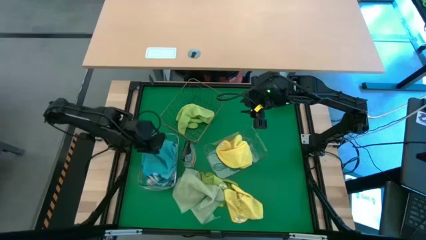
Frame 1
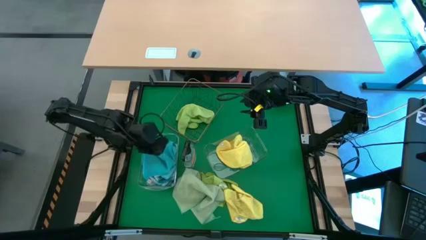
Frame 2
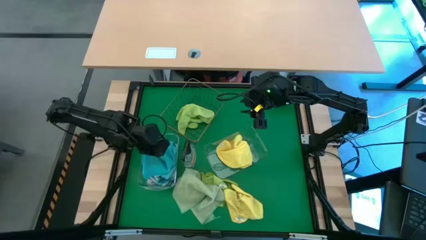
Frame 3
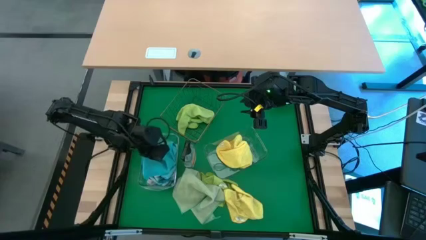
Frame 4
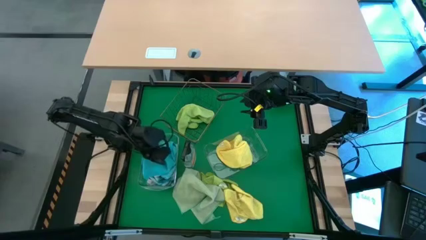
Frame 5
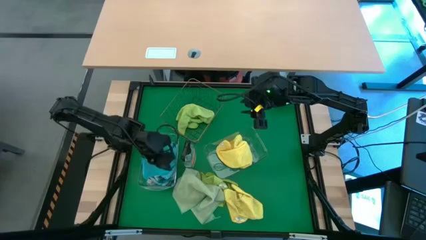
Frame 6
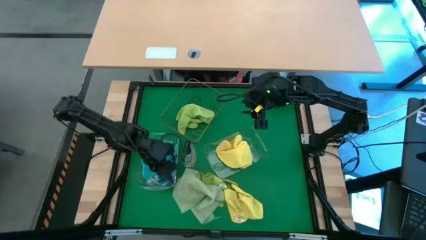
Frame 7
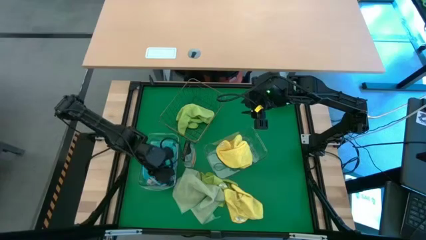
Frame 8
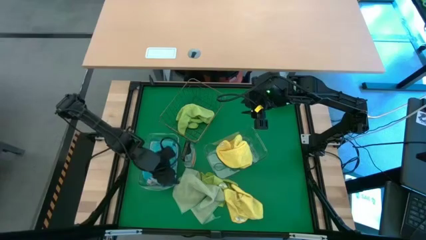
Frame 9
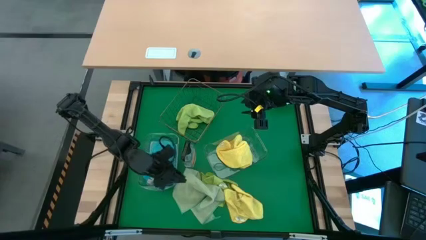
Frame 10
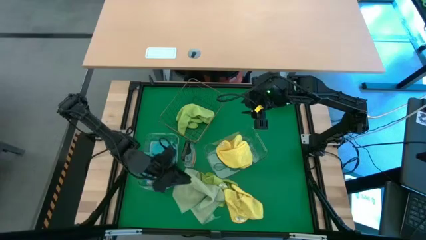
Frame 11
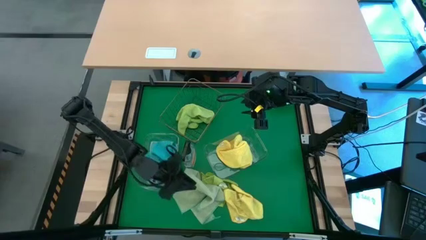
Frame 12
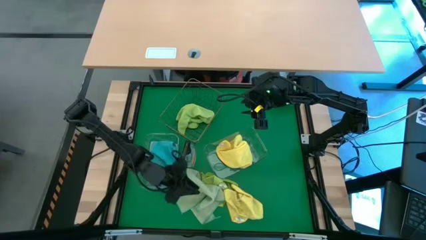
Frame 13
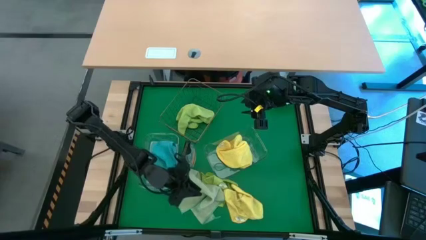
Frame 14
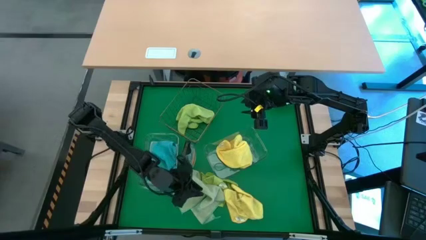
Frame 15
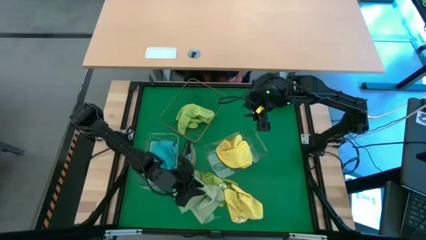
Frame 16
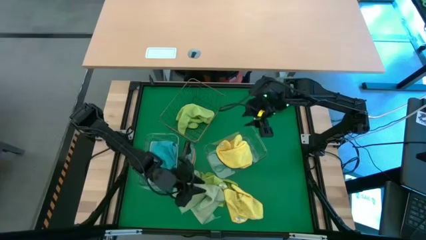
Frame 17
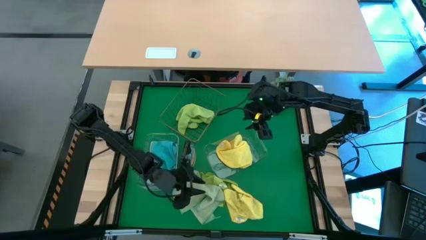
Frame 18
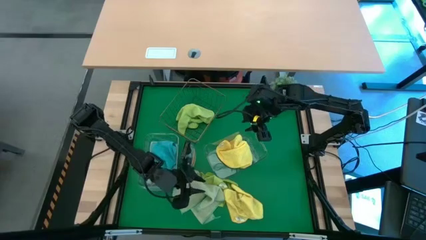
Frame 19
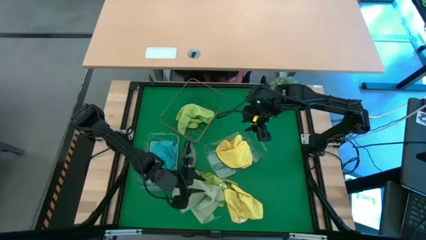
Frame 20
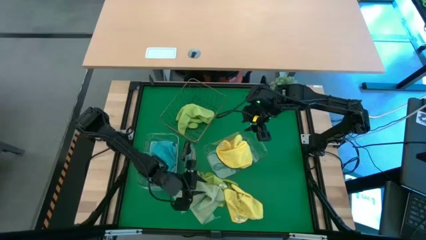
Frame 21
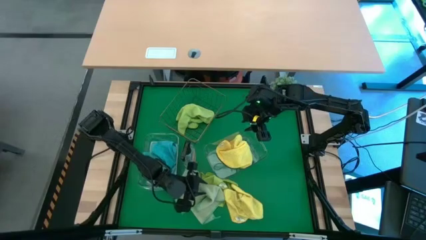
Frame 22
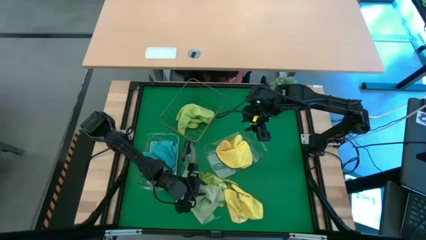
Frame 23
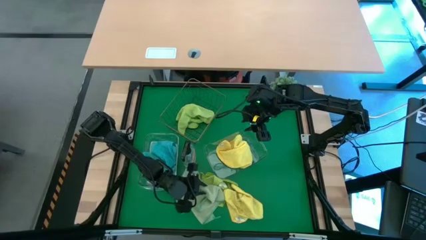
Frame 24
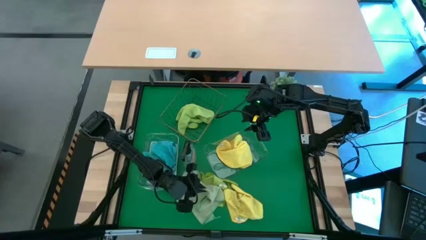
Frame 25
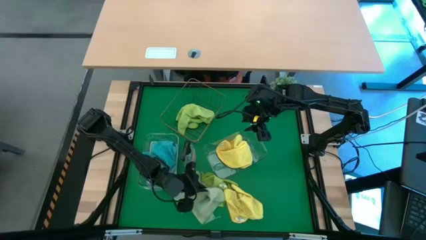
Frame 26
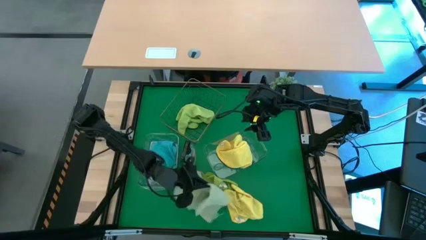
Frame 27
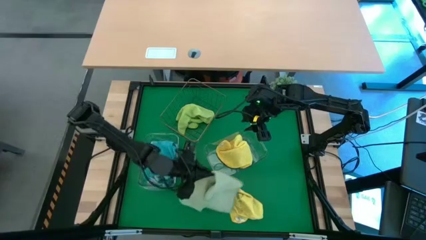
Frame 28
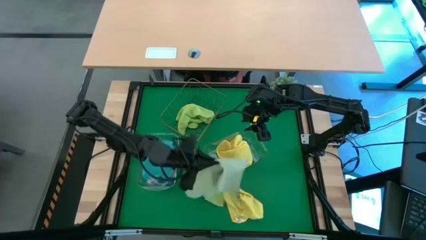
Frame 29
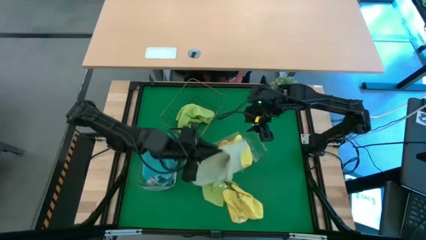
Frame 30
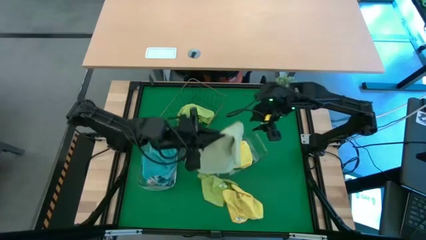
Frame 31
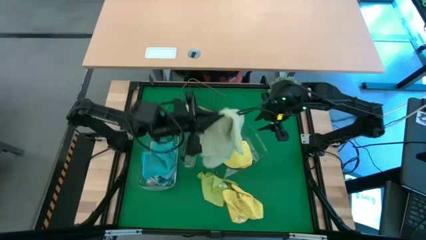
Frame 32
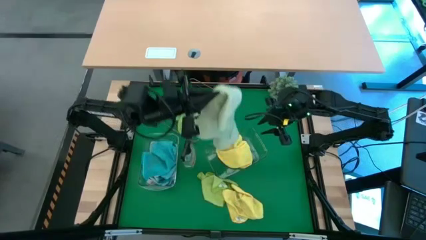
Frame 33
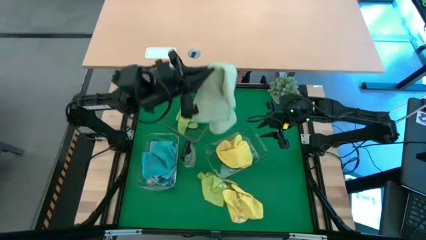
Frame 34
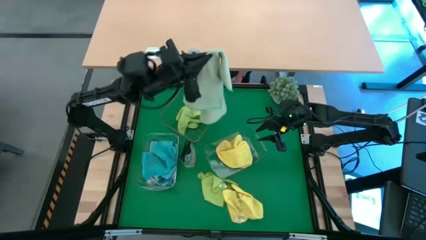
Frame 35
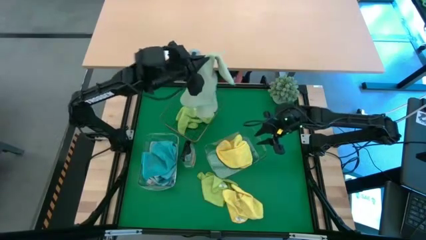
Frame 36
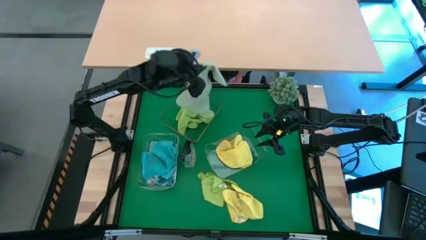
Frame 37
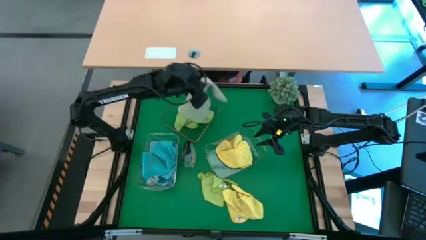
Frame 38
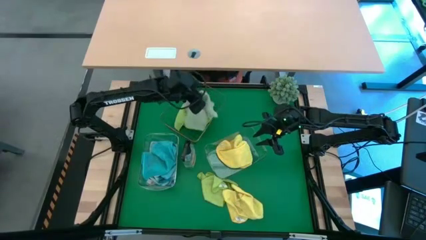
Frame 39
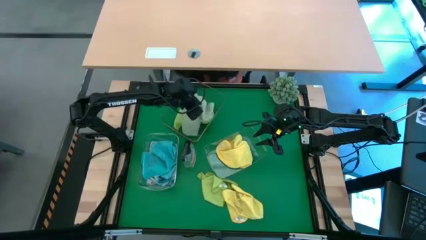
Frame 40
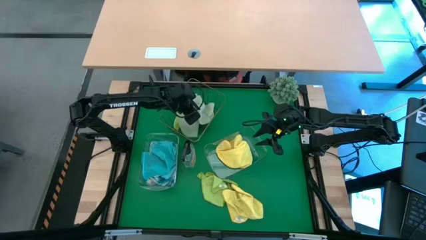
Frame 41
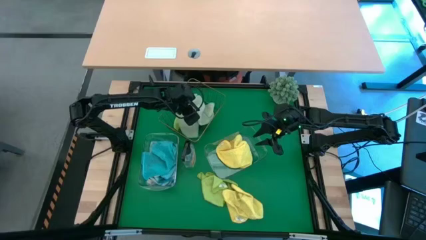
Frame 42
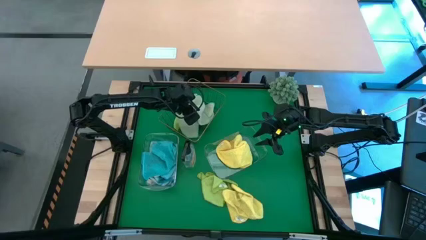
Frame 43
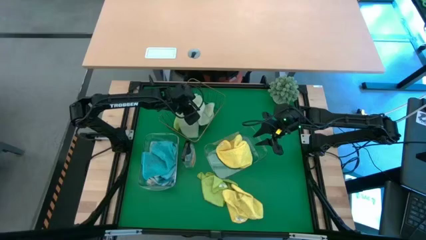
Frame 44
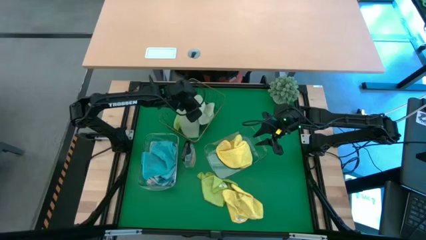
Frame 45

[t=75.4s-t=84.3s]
Task: Sort microfiber towel by color & place in baskets
Put the light green microfiber towel into the wire basket

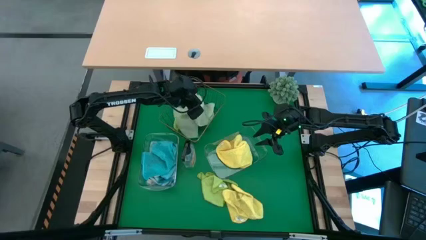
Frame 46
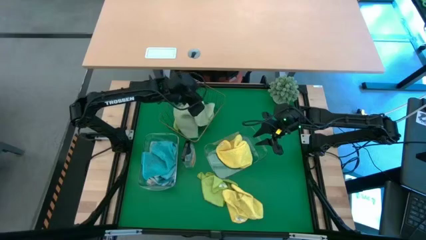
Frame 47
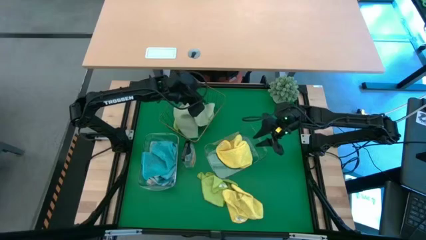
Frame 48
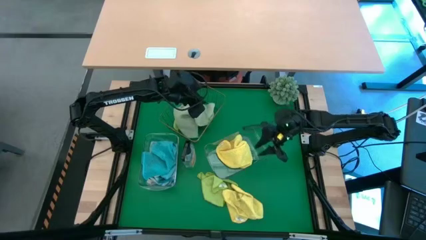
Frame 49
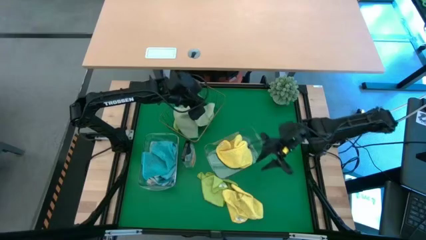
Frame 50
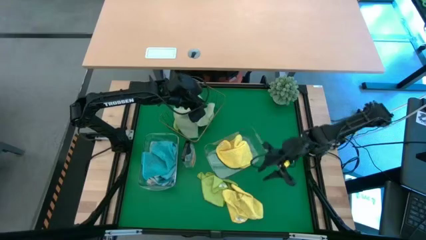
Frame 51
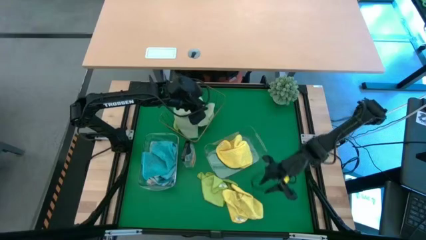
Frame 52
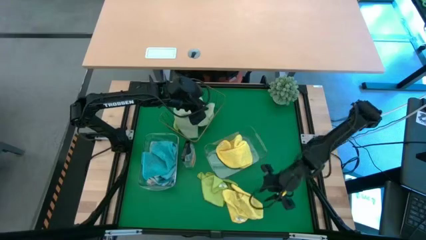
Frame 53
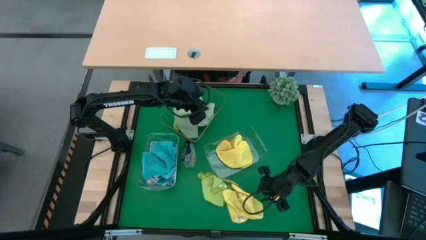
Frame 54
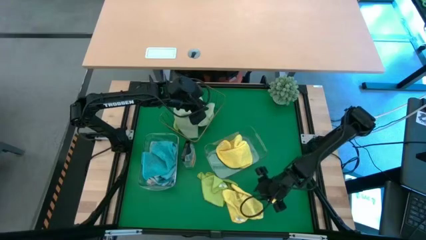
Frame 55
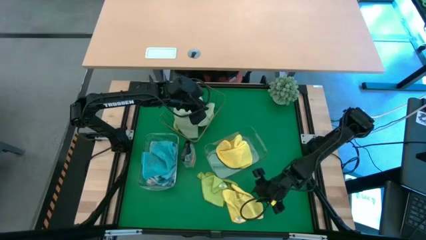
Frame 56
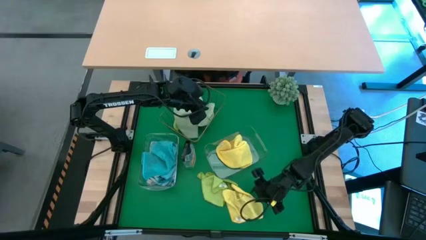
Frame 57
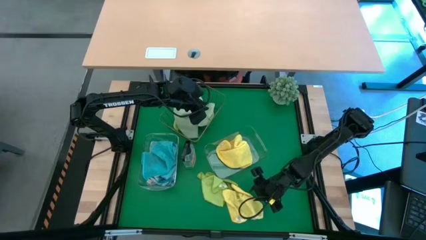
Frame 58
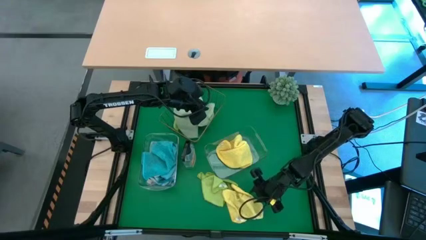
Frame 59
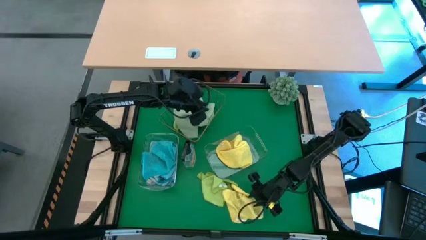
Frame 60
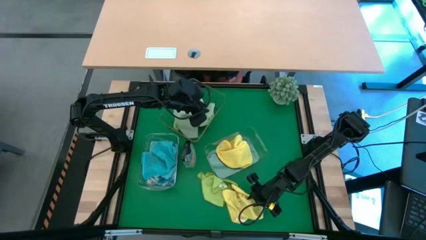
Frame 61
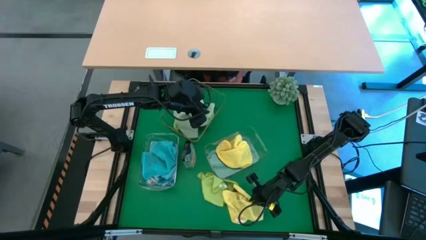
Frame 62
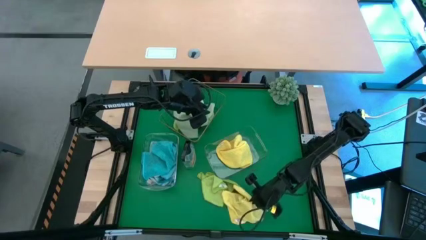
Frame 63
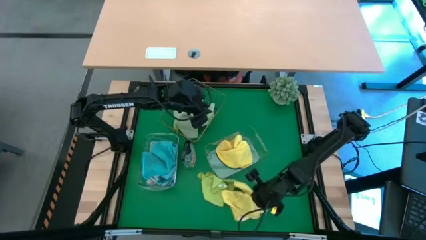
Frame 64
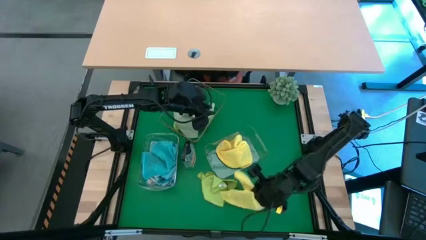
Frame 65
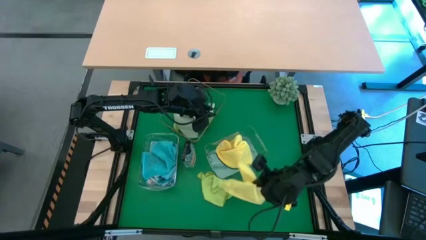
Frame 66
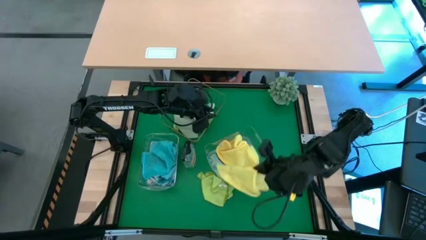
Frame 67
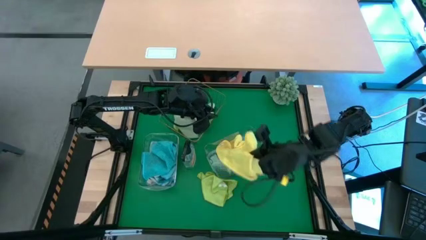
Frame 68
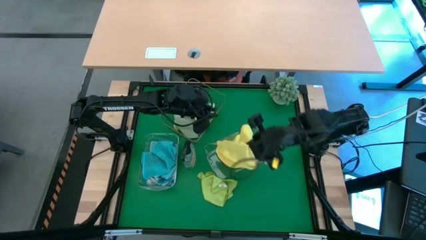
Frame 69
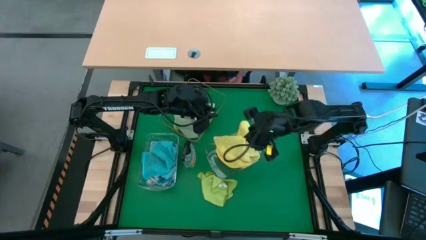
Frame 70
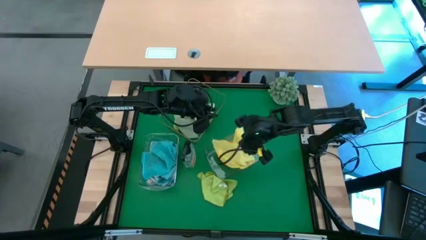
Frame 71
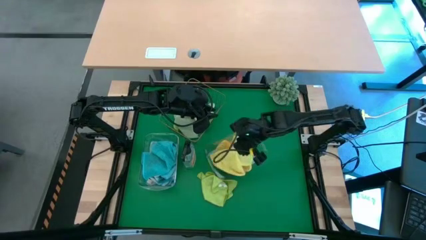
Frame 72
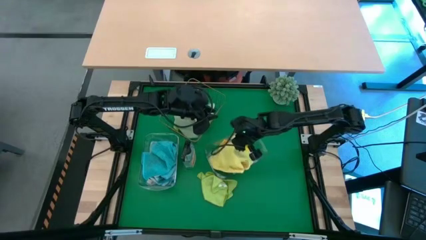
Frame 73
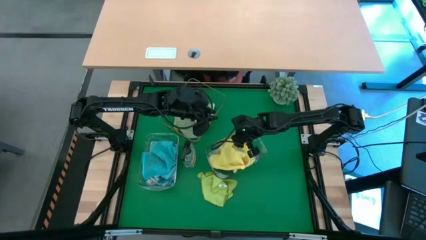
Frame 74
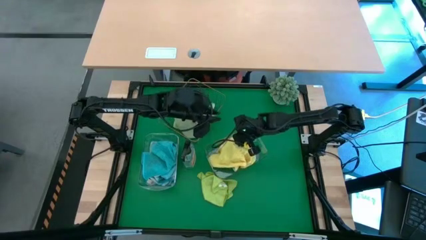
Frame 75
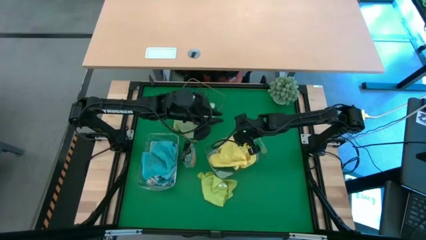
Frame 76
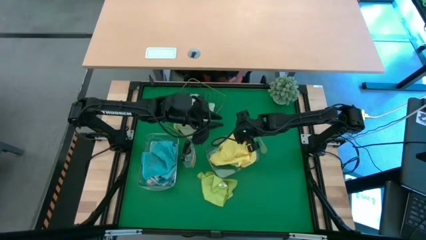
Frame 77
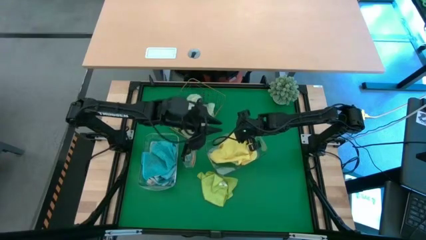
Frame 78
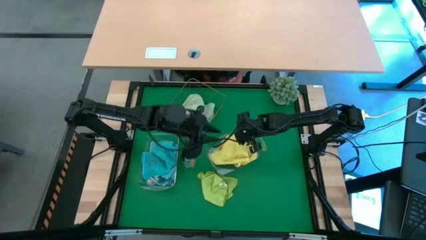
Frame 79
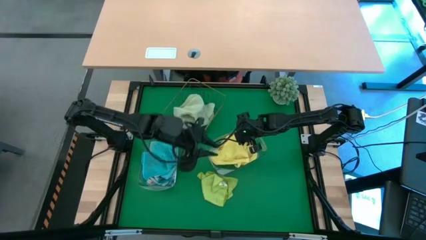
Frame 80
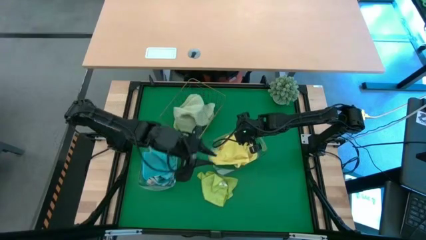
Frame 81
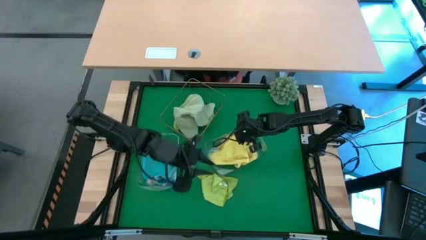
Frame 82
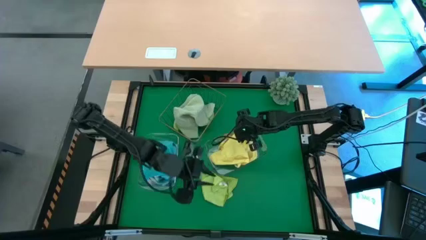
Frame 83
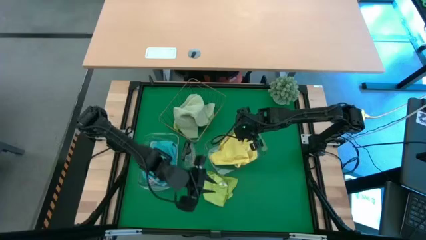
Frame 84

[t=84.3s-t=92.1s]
Put the yellow microfiber towel into the right transparent bin
